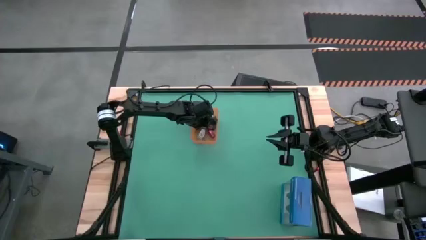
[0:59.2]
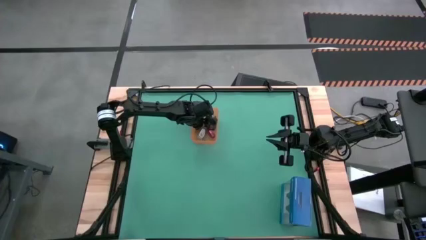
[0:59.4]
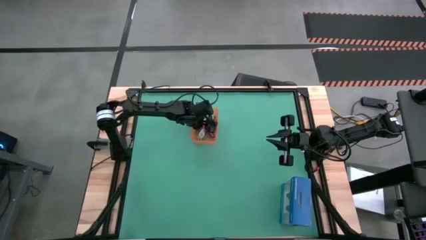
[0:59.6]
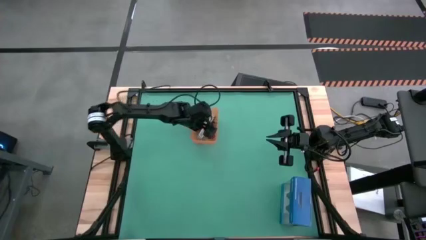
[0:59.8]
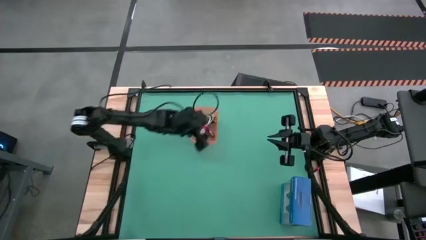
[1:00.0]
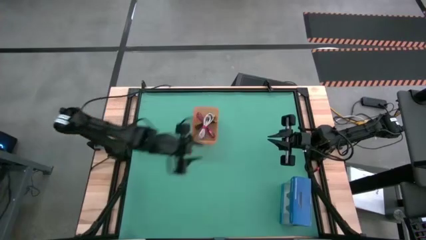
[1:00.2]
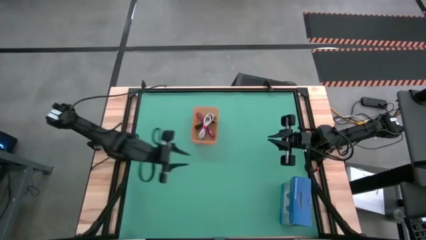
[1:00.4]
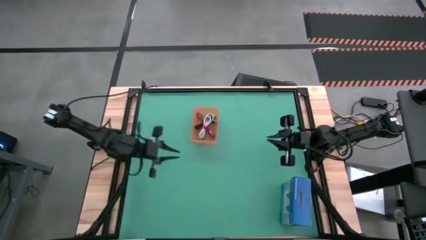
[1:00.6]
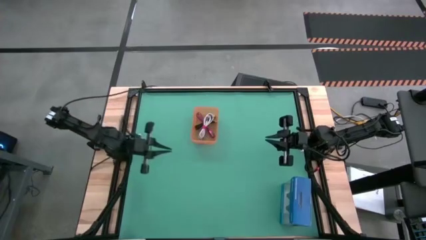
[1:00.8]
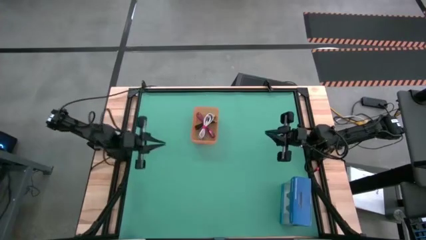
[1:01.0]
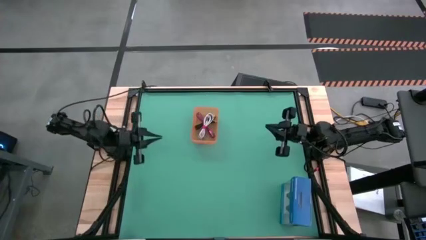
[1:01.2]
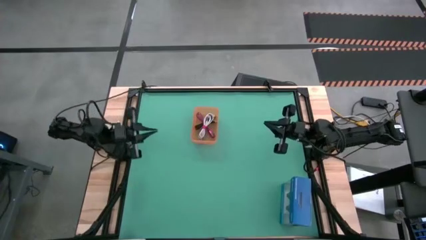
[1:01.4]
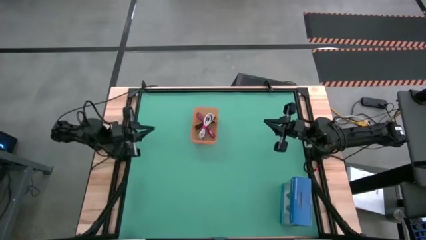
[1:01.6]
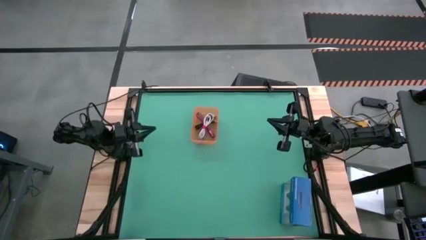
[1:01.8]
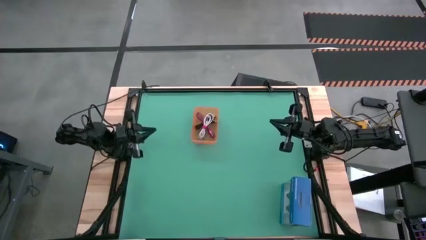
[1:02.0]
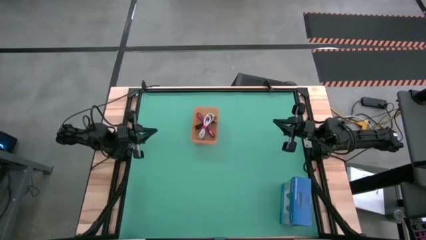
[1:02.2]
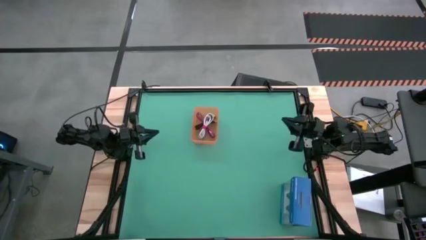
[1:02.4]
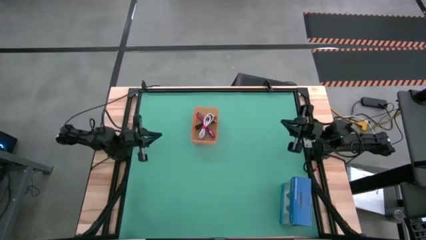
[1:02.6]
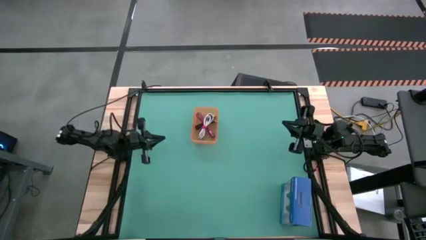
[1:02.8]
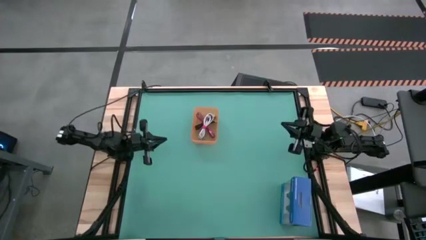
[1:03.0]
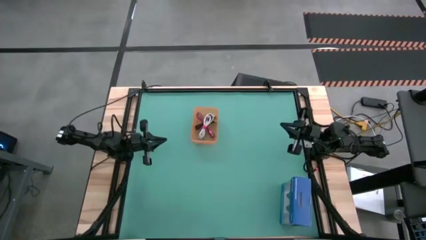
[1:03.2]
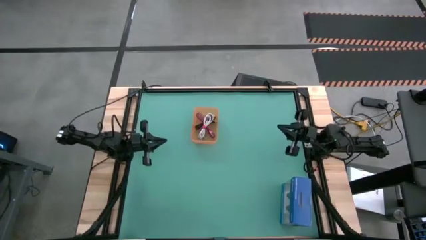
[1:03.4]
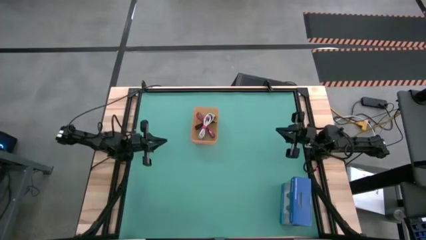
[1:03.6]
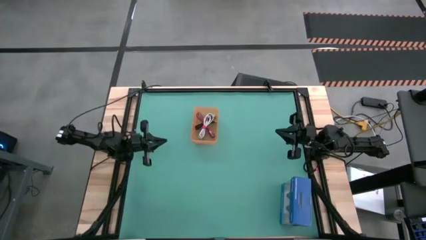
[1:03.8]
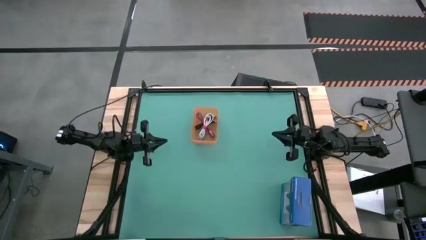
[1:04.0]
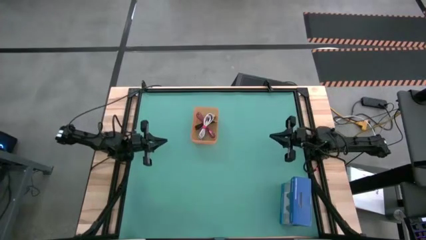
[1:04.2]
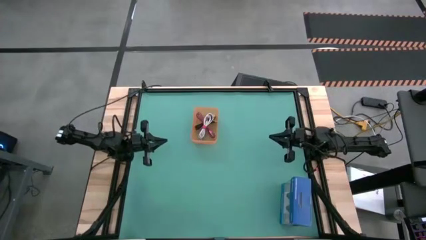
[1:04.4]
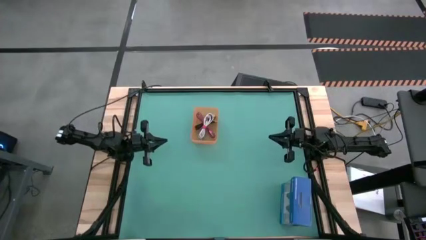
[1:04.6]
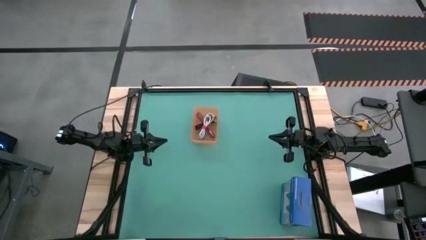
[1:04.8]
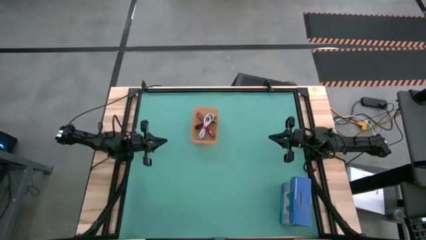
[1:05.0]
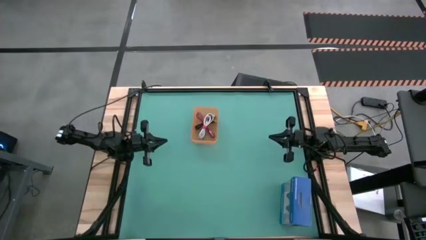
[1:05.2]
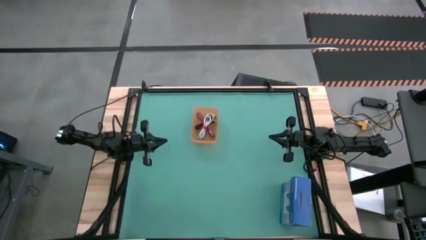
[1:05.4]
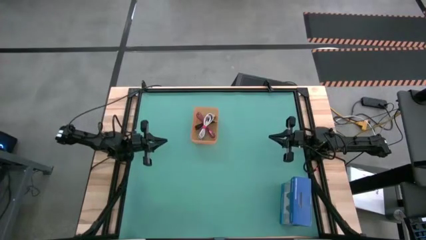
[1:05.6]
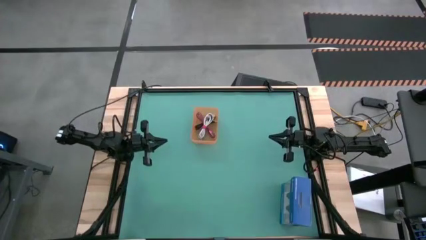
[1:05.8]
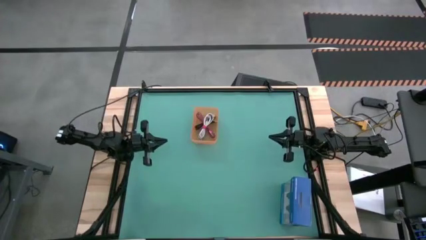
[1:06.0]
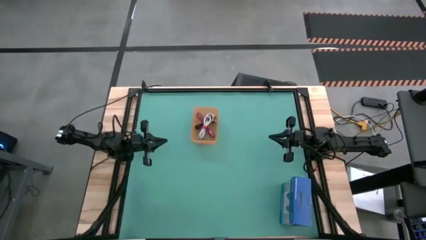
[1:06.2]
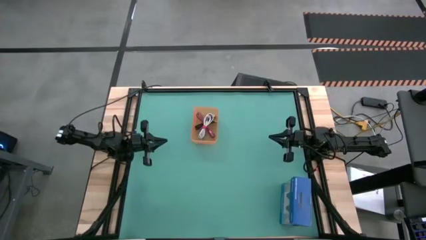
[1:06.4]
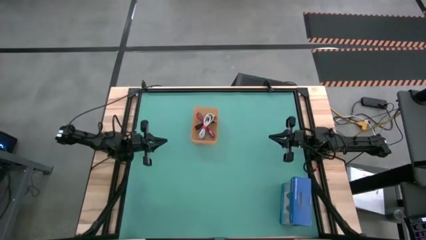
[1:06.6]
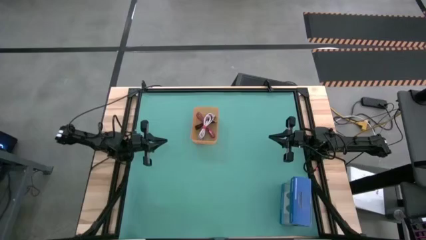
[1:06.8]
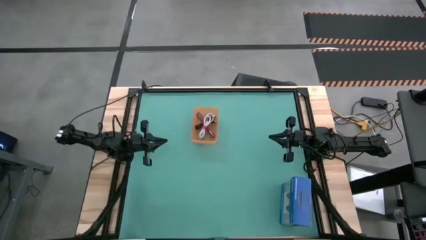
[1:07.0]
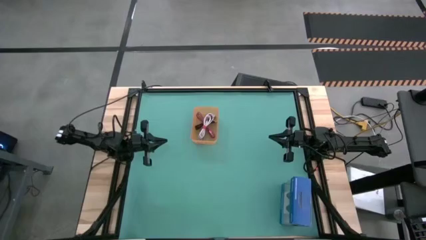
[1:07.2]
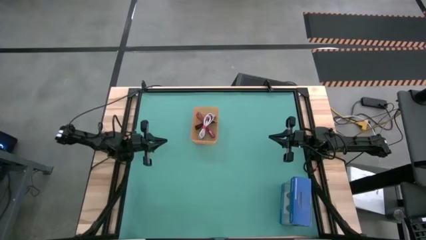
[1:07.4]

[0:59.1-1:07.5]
Task: Pick and place USB-C Cables
Return to Home Position
